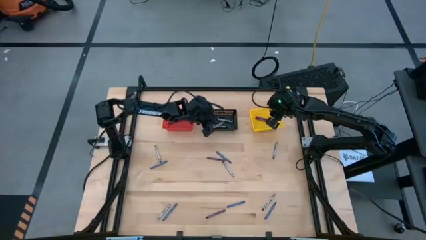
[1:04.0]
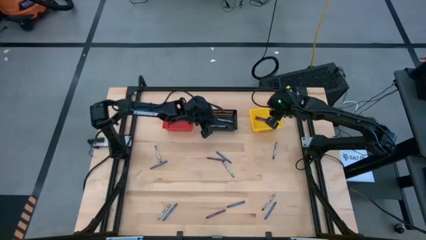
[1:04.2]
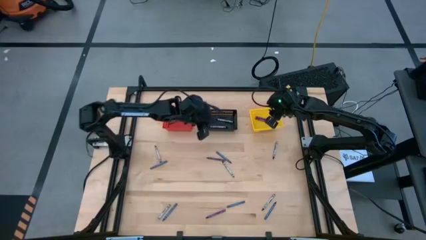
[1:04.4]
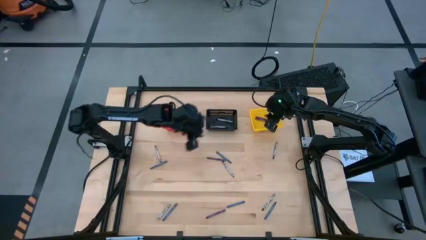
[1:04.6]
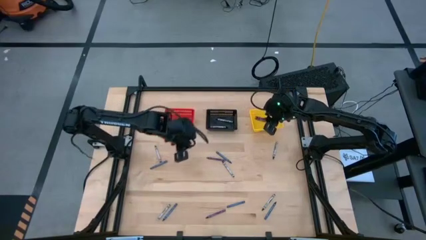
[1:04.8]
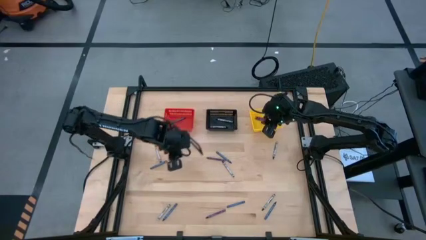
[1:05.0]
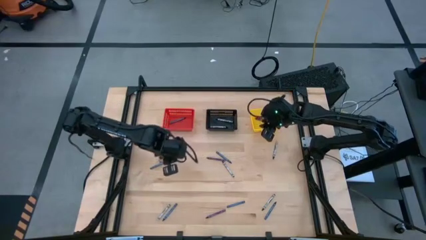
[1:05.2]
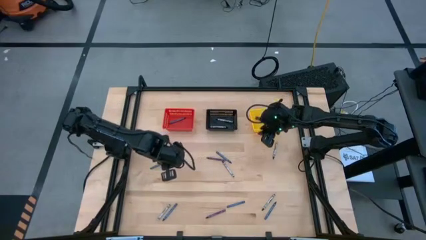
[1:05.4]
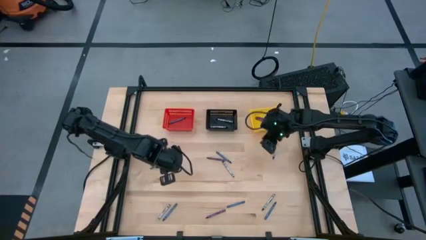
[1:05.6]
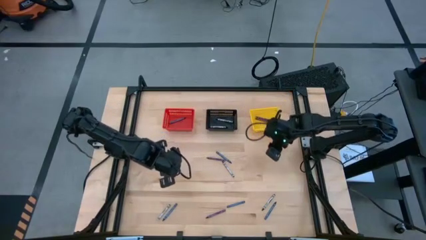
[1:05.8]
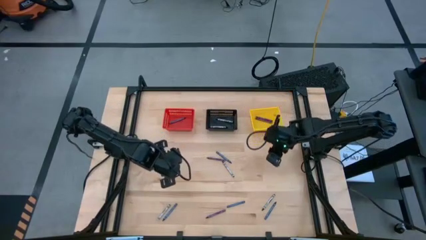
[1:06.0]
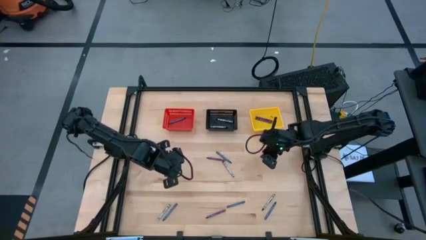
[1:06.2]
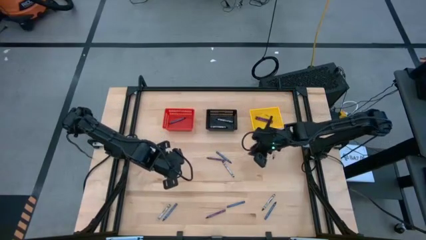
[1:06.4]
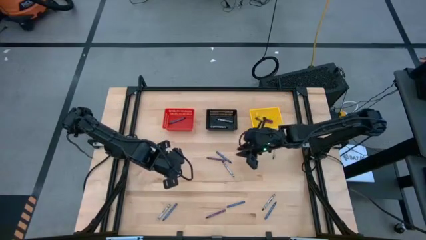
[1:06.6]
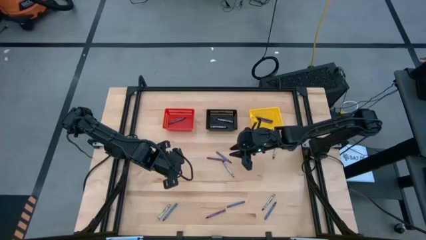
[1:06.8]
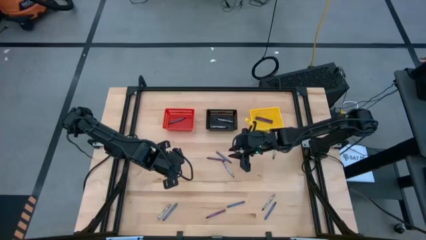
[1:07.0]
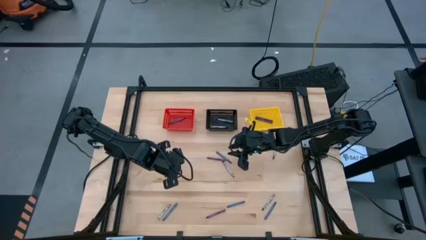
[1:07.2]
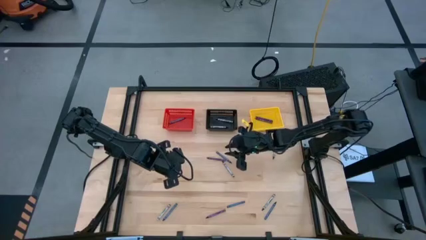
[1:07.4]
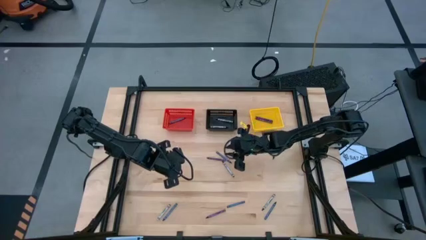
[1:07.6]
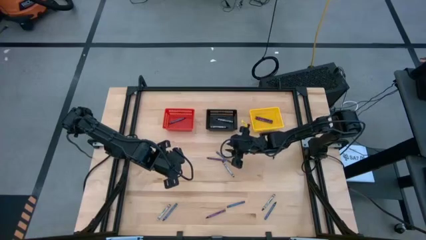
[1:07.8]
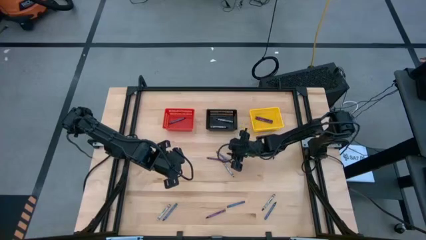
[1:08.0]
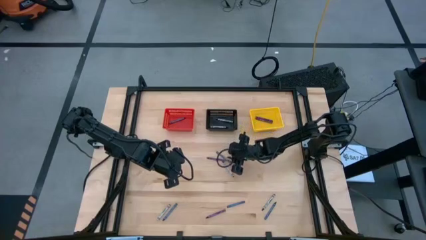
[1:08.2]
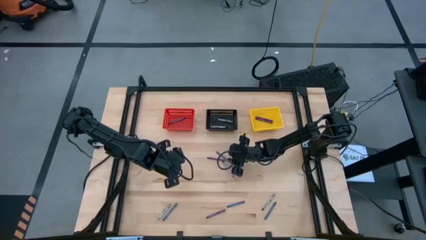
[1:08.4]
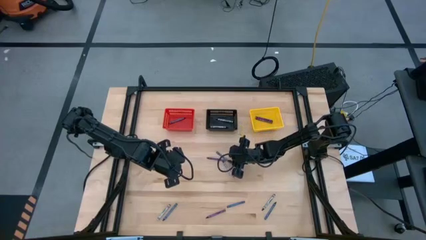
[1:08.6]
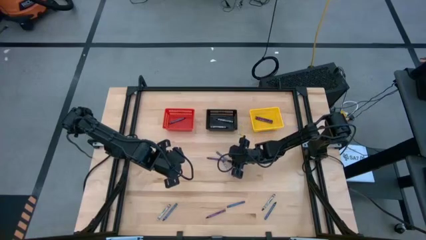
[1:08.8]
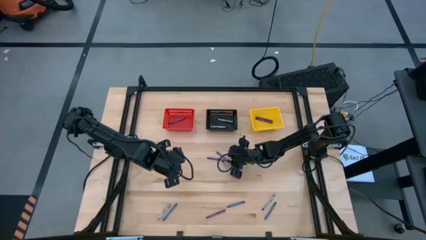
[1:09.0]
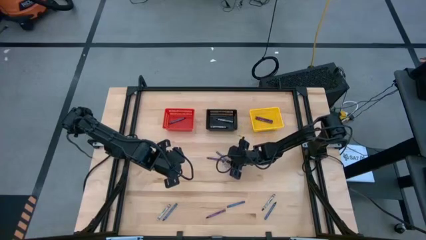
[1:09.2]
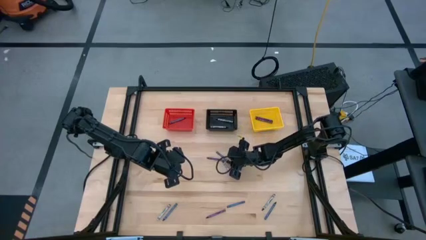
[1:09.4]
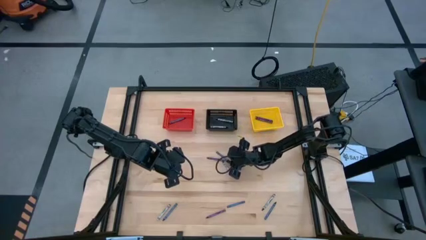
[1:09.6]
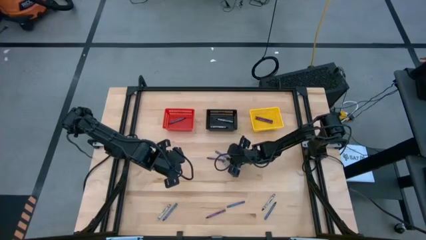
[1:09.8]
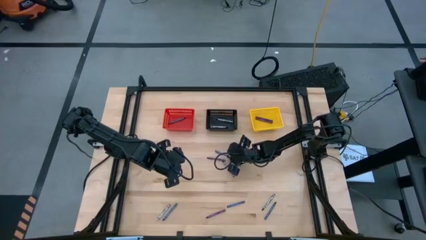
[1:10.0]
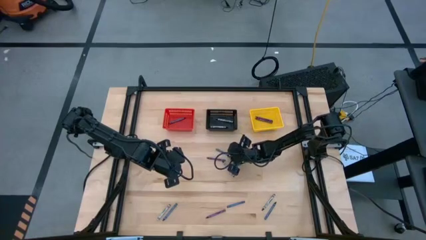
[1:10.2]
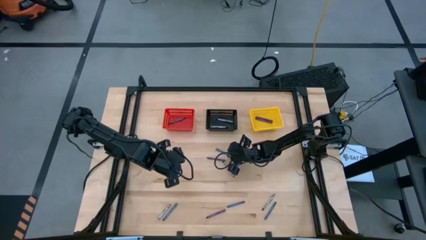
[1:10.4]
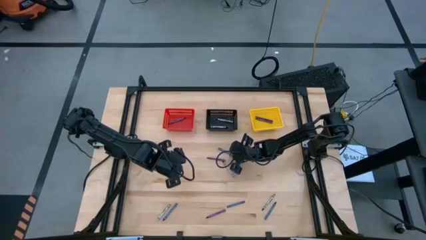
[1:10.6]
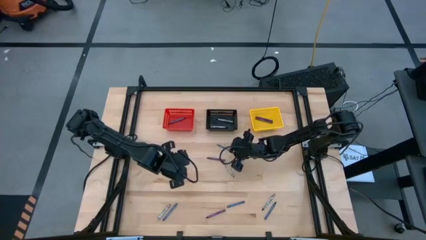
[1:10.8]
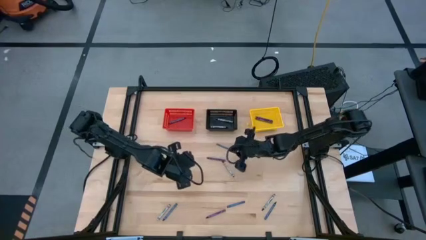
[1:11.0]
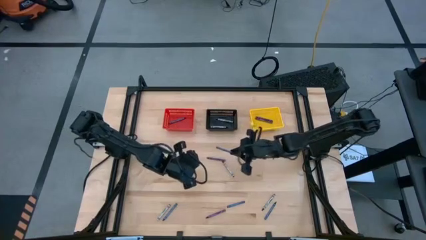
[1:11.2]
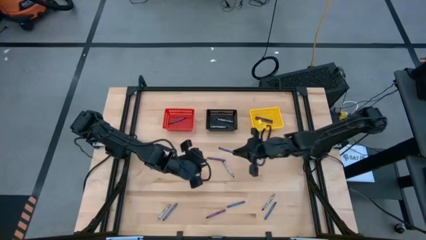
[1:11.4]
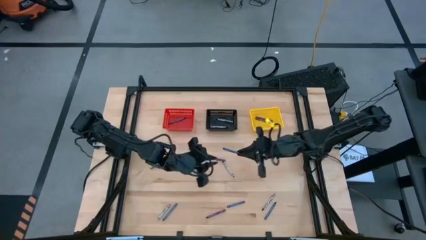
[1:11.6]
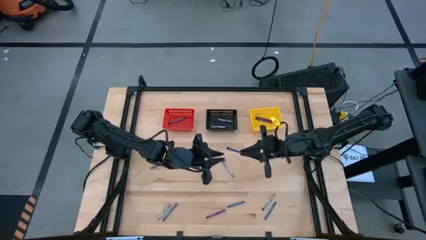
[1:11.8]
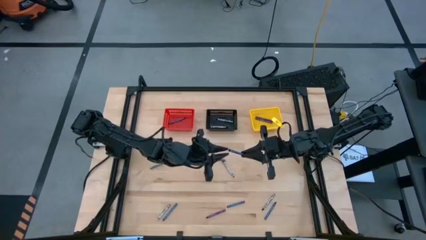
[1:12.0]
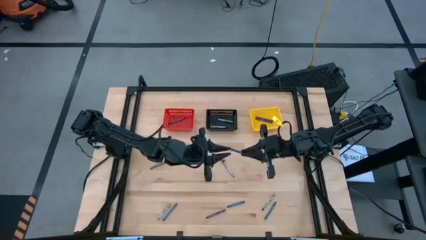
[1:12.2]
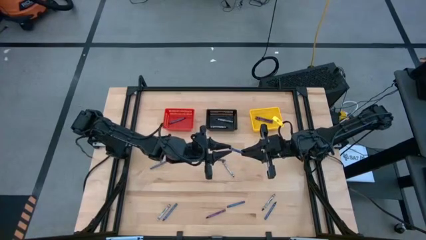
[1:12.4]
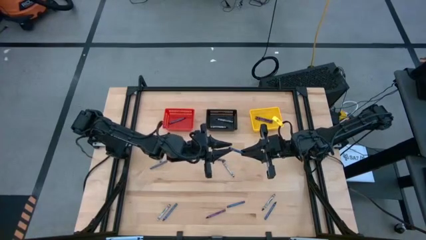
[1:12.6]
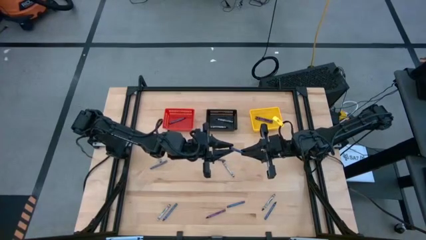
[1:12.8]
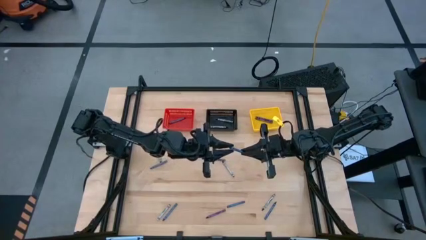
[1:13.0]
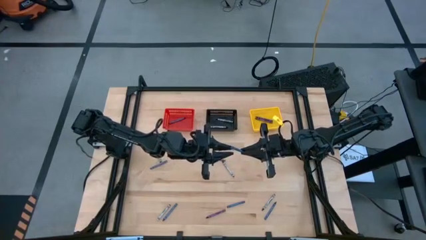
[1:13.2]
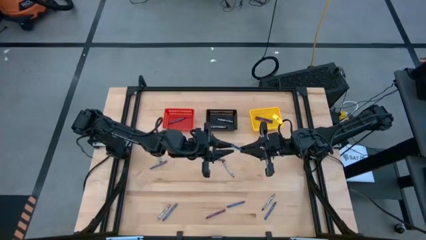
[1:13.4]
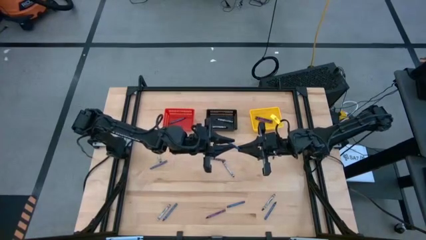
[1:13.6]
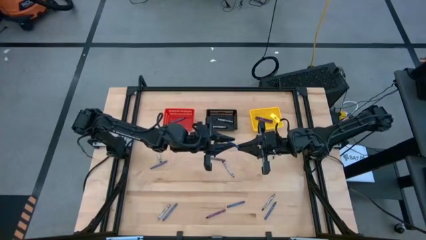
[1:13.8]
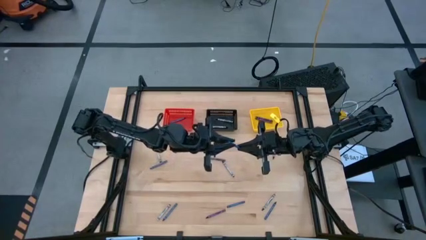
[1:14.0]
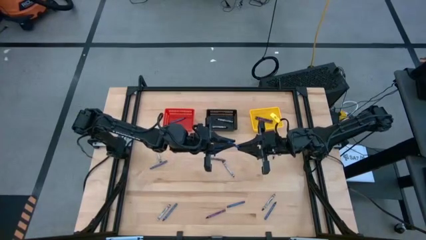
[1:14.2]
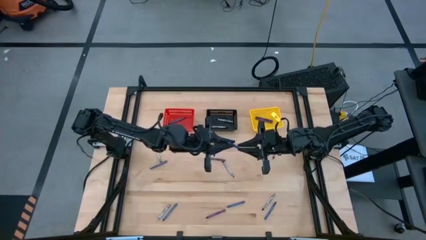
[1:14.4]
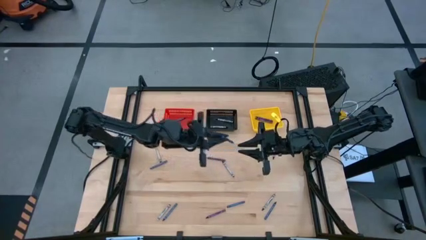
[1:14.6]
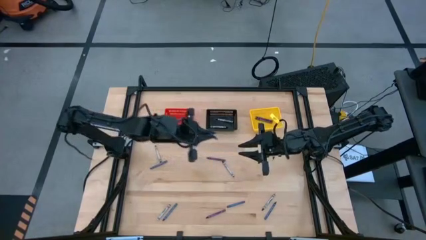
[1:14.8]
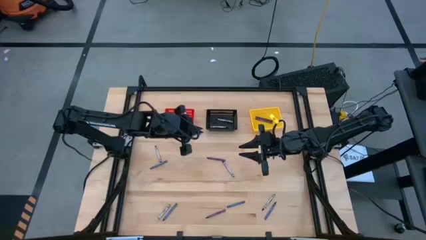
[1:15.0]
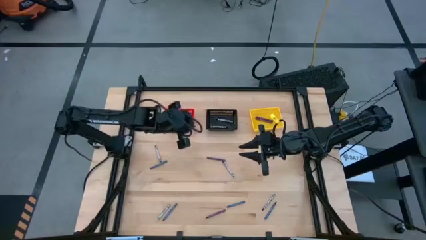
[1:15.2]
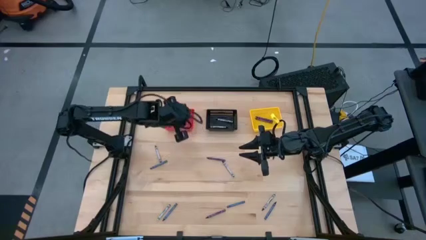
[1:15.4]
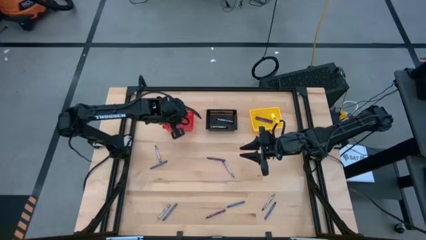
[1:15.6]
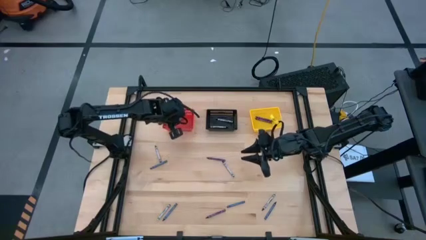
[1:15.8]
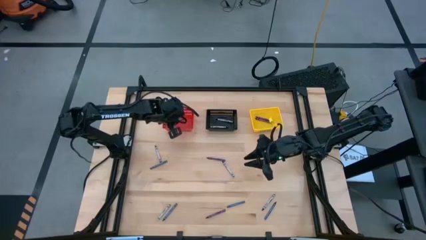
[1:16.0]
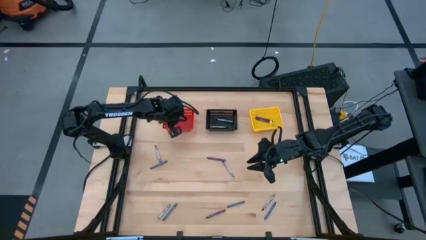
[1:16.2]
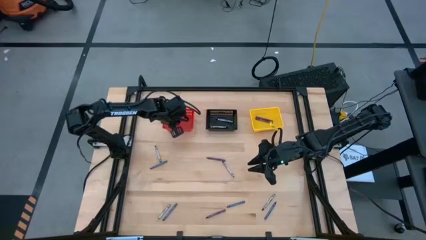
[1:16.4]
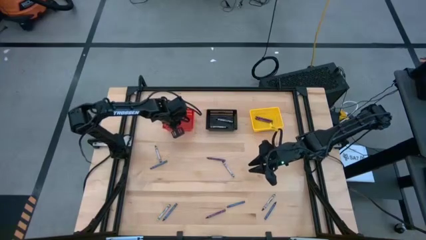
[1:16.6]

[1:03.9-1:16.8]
Task: Sort crayons
Put the blue crayon into the red basket
